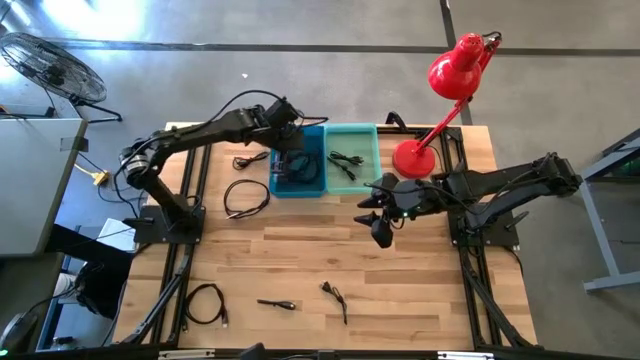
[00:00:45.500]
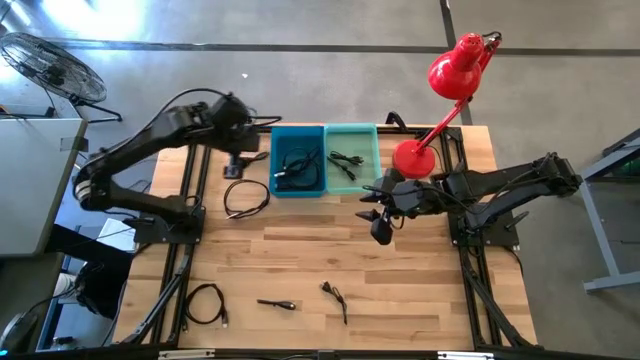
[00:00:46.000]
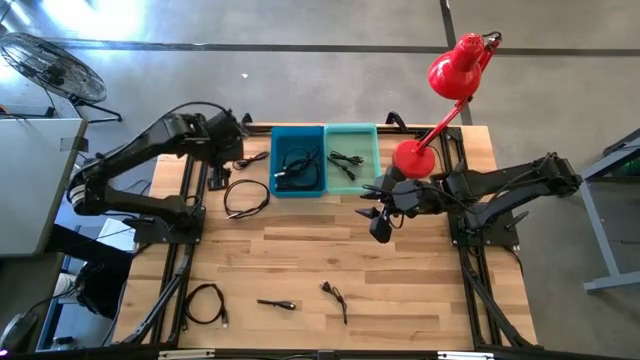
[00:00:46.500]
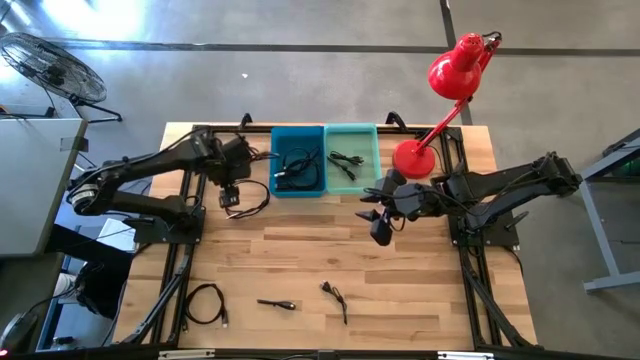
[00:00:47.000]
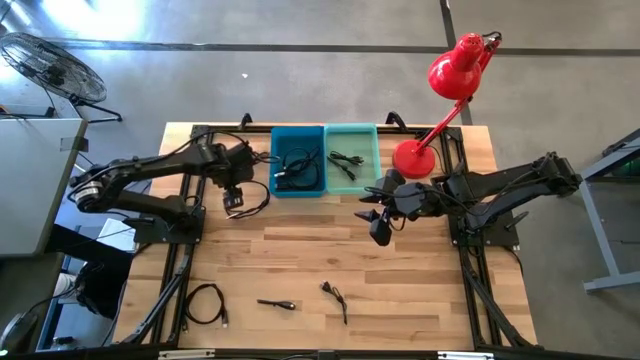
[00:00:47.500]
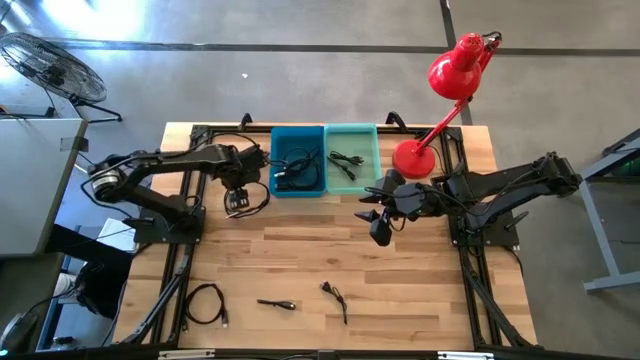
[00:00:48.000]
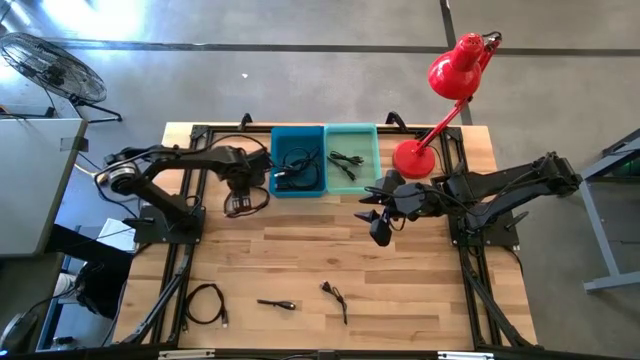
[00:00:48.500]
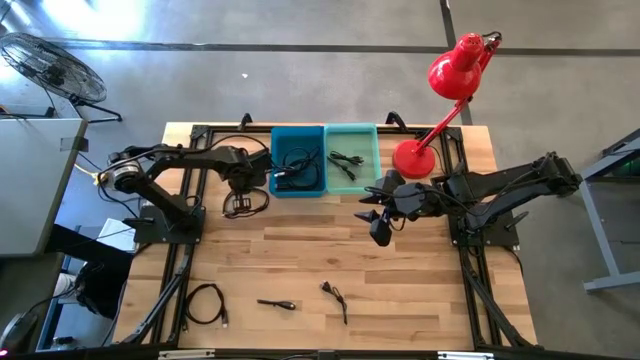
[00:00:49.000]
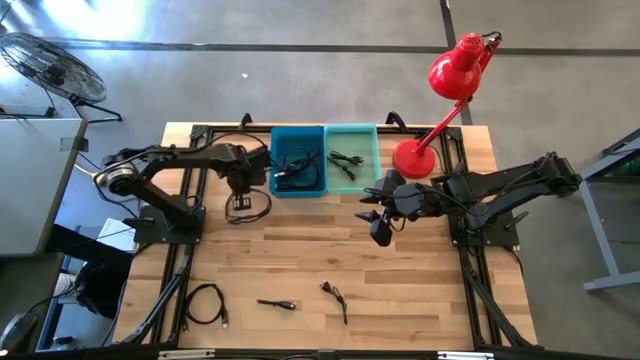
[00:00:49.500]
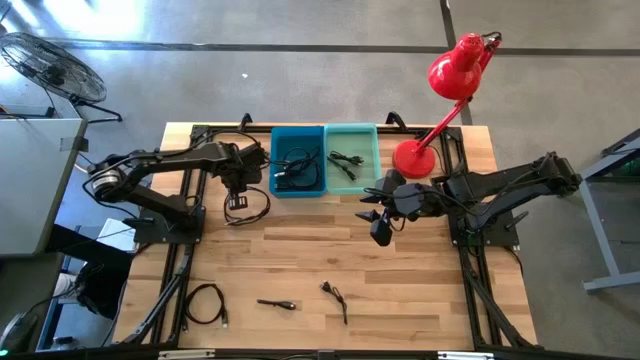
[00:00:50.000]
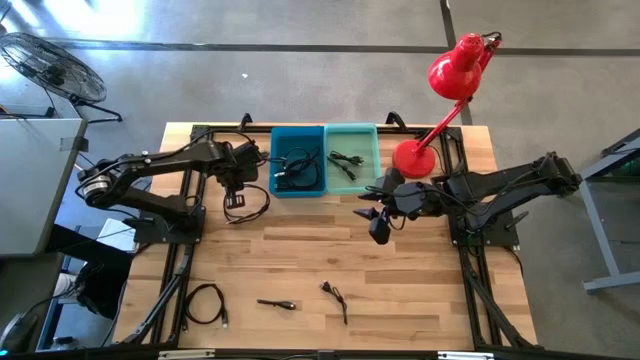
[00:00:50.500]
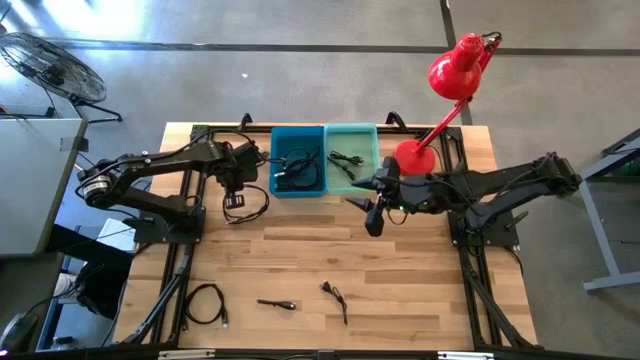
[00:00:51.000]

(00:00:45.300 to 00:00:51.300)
Task: Pick & Place USB Port
Put the black HDMI cable into the blue bin

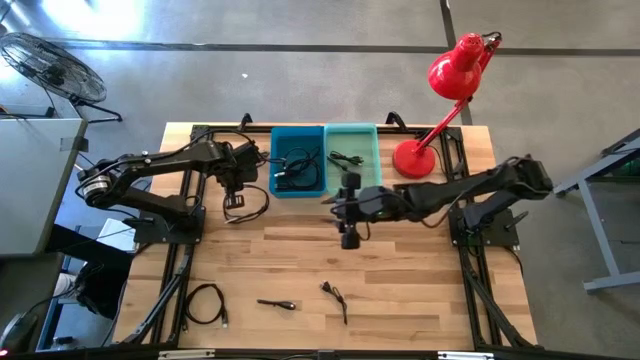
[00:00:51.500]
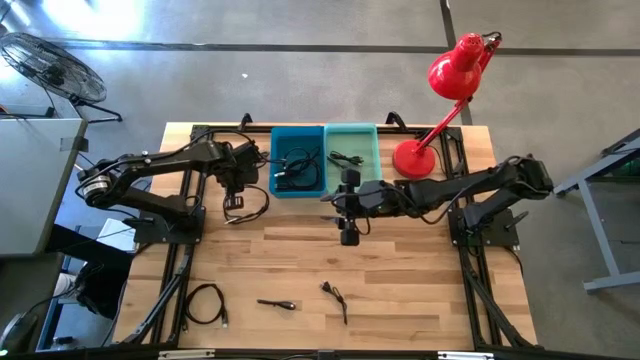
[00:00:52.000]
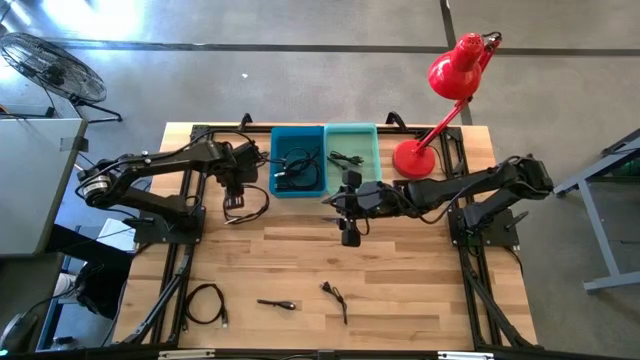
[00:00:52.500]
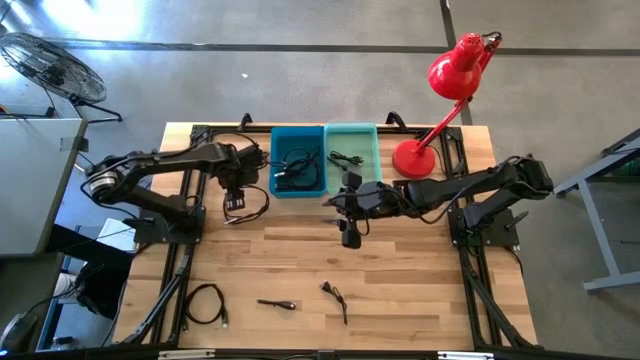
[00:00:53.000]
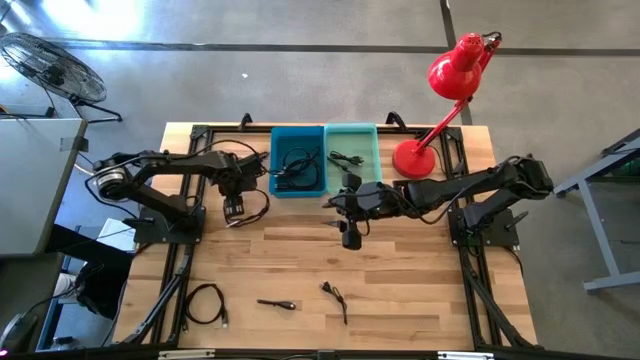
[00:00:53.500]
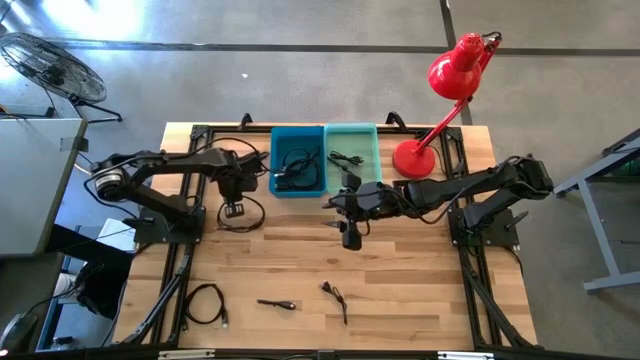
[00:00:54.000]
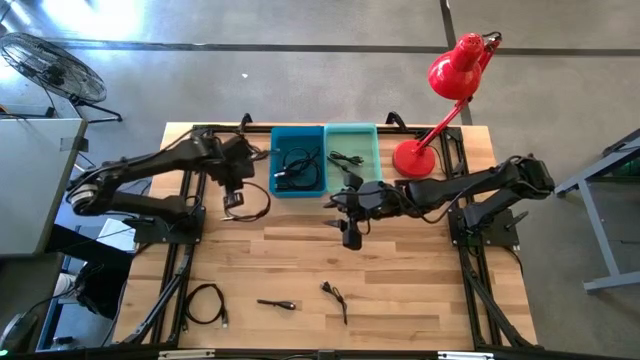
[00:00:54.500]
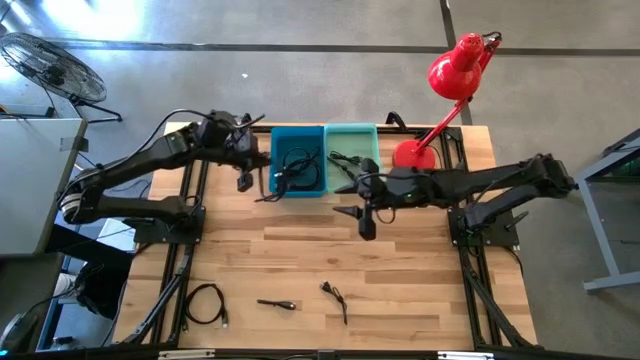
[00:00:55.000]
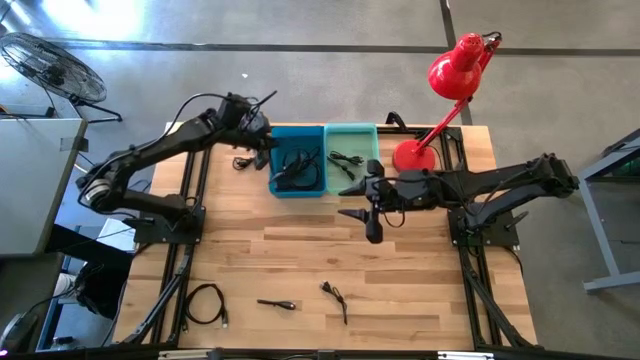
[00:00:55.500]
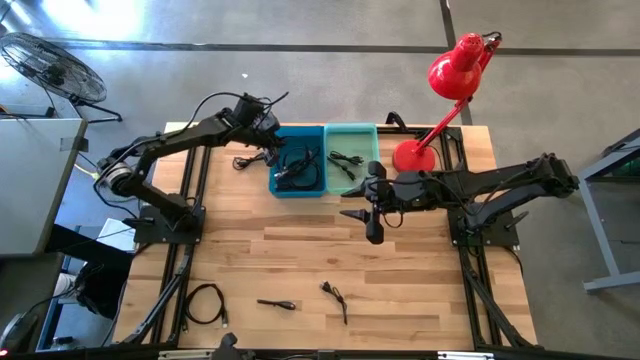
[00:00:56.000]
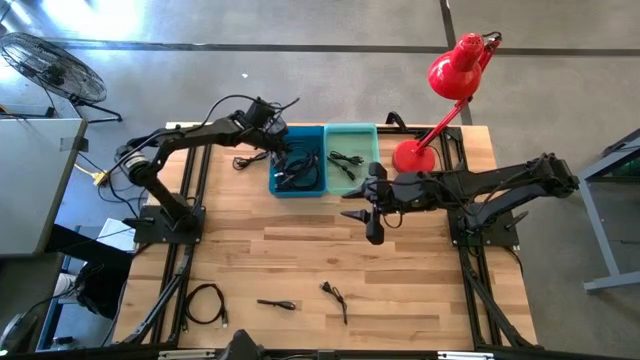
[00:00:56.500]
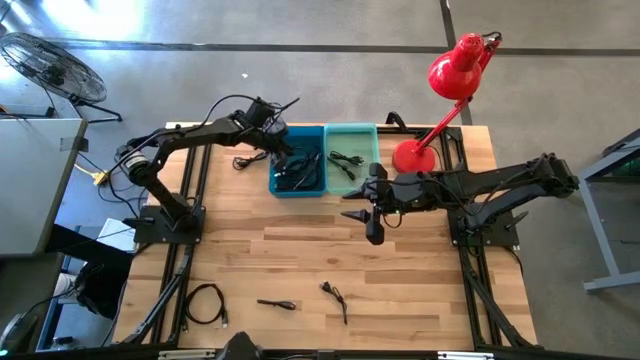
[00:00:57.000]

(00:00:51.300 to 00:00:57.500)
Put the black HDMI cable into the blue bin

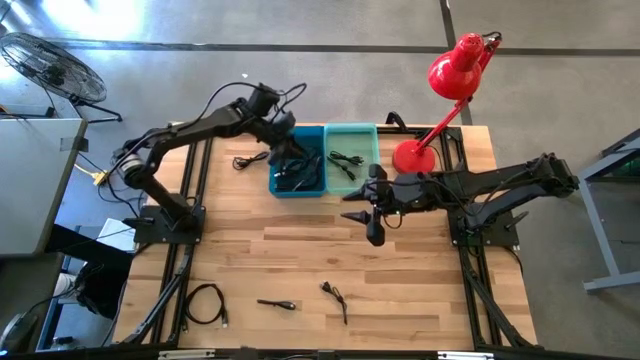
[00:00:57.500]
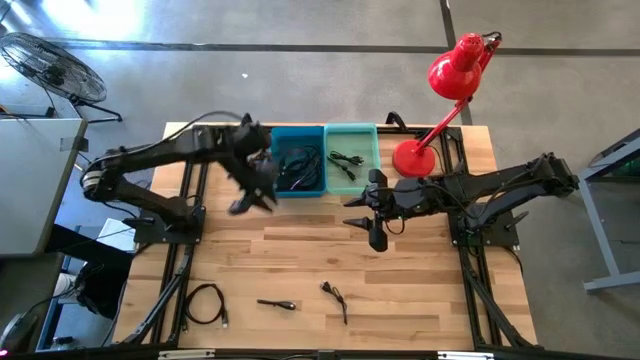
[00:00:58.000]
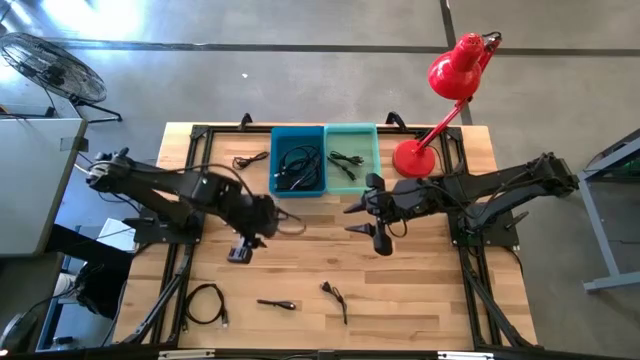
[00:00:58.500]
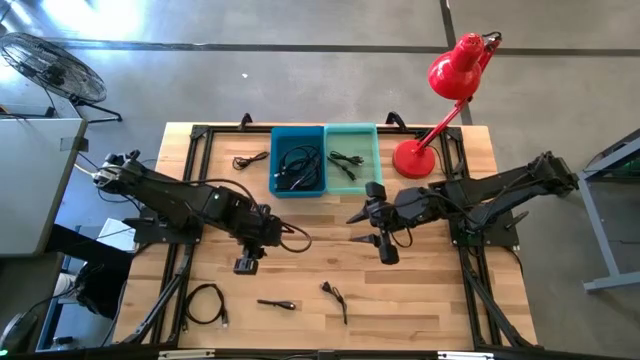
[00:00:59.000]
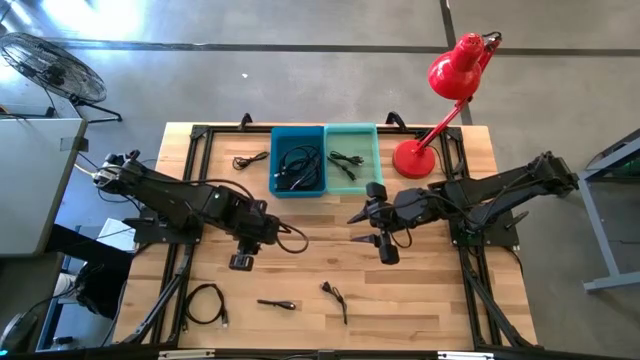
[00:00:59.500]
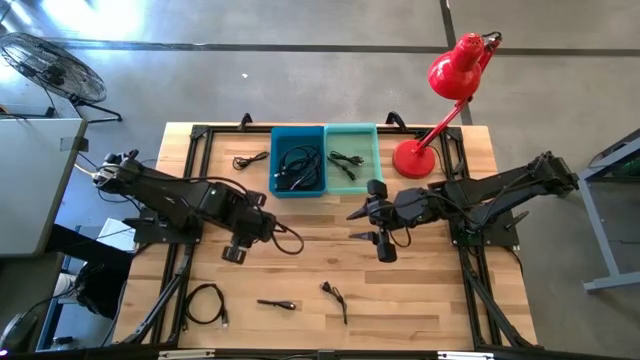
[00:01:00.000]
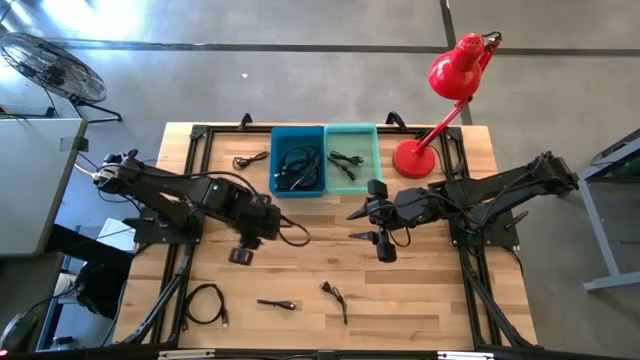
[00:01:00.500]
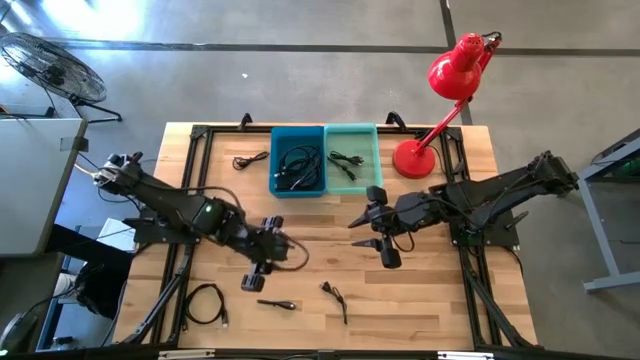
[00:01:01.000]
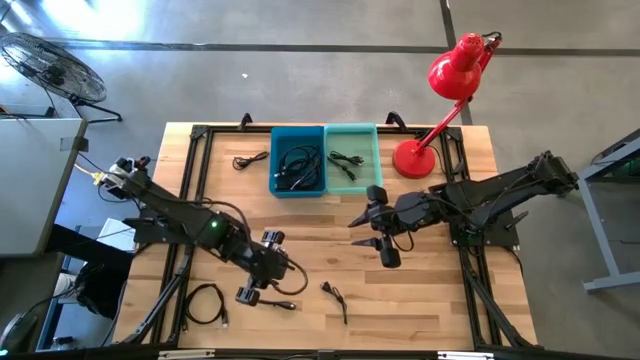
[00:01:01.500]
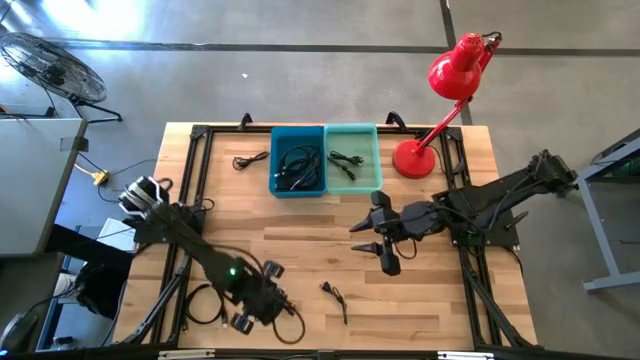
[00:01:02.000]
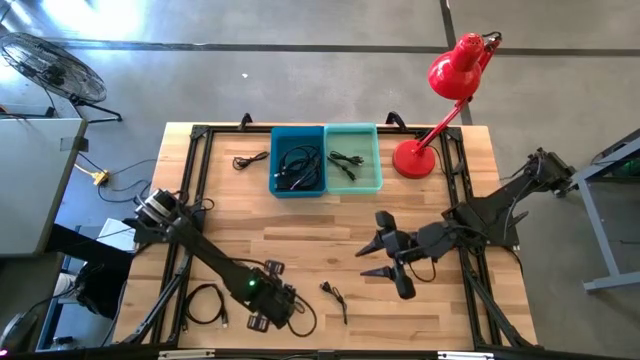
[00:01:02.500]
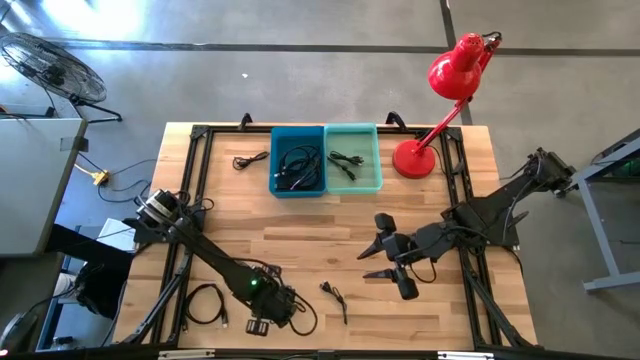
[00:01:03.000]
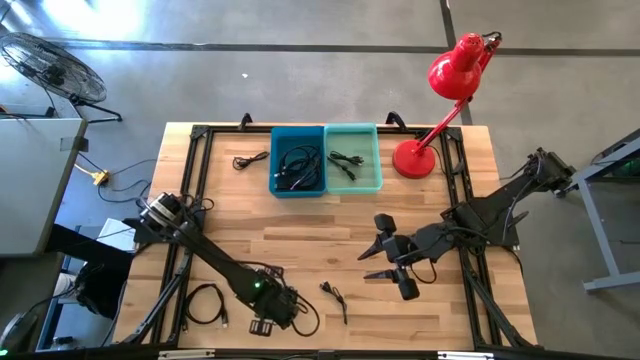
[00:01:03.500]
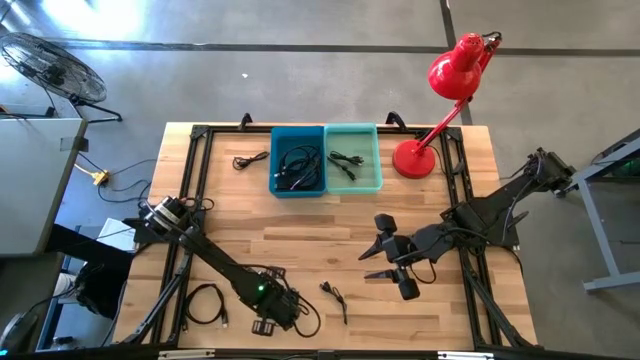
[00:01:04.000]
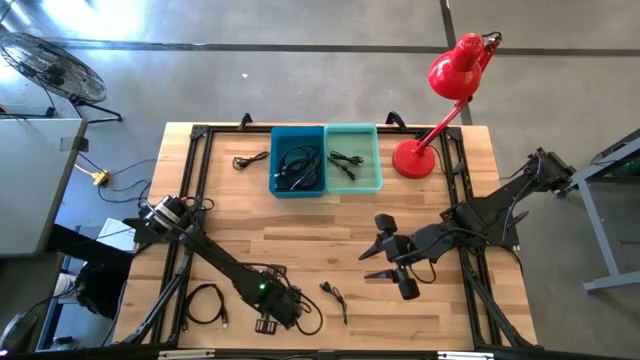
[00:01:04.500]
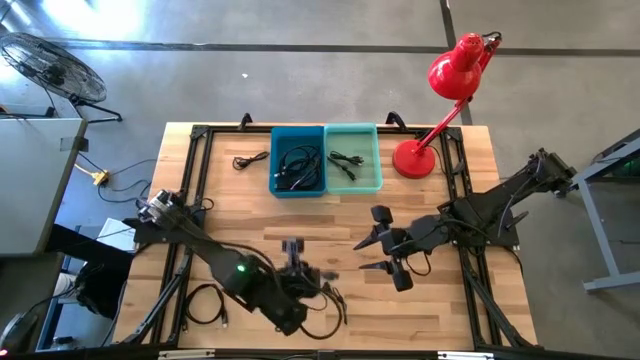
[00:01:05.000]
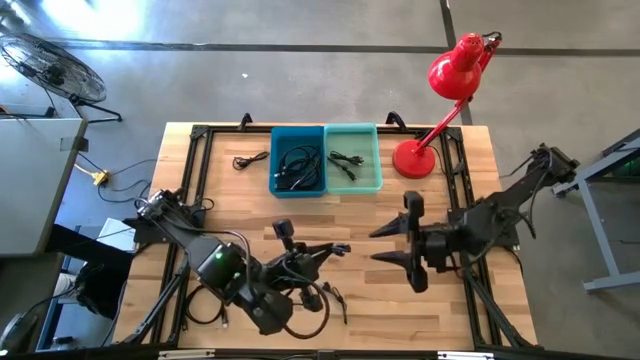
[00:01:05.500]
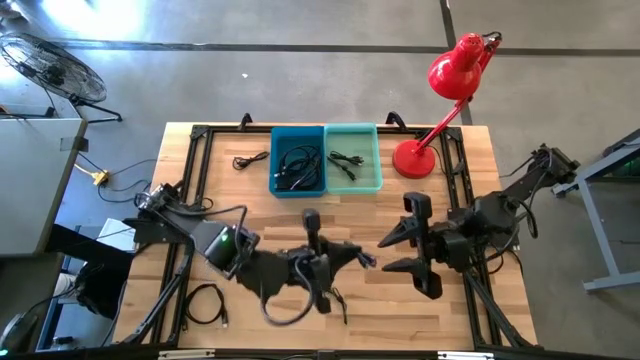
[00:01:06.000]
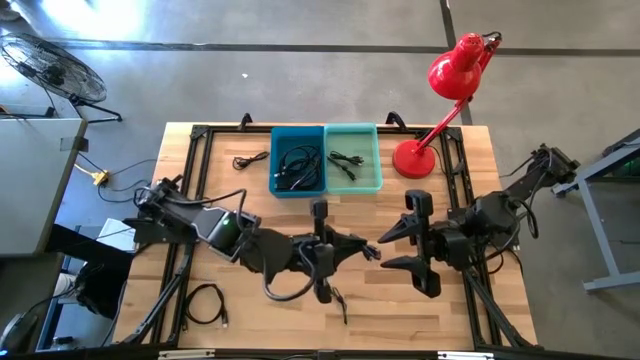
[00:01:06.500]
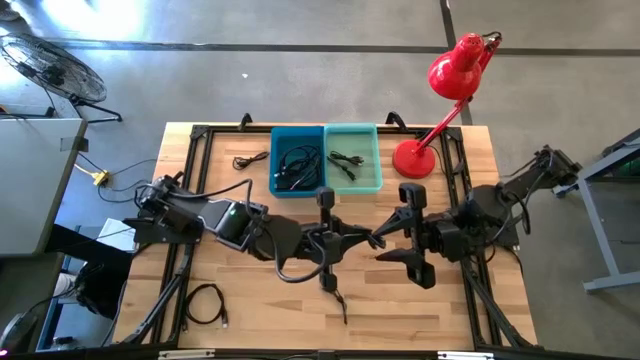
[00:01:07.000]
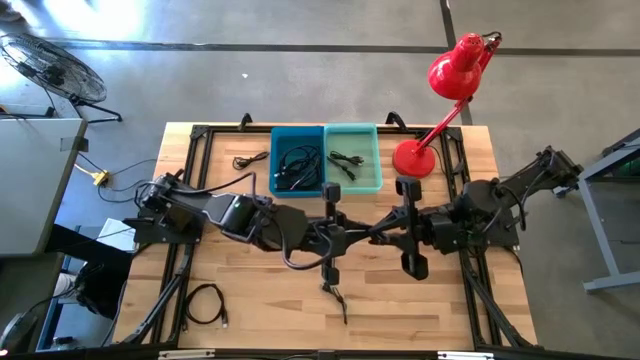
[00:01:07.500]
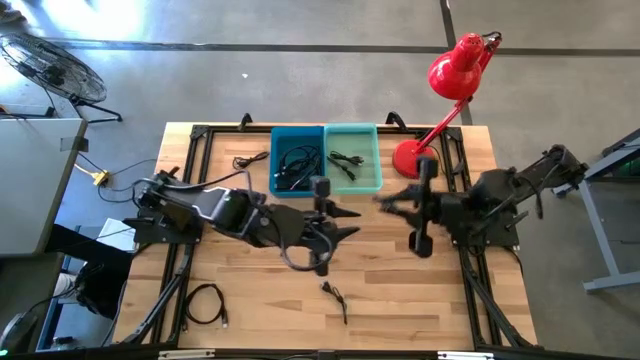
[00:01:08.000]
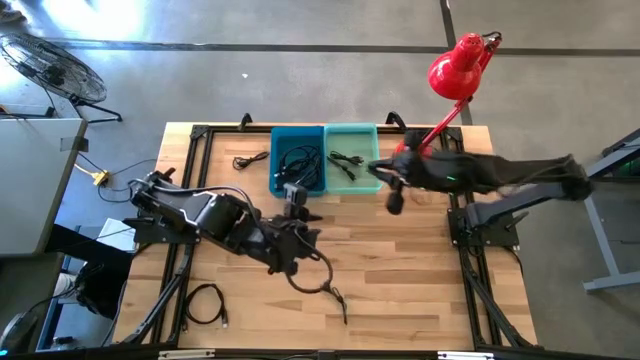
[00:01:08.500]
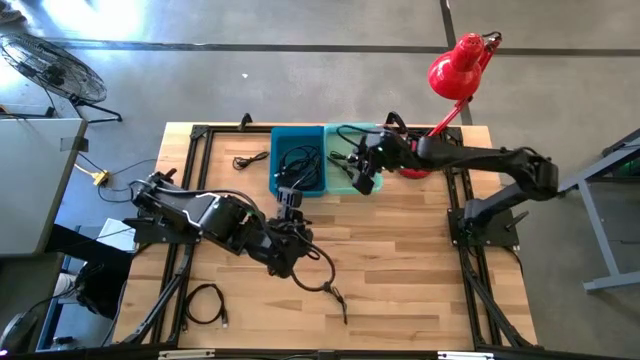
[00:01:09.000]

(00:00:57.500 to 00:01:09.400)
Put the black USB cable into the green bin
